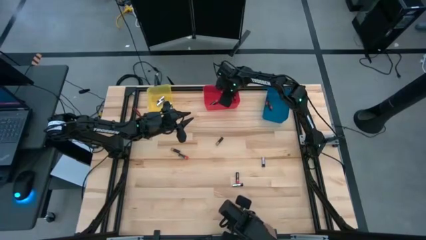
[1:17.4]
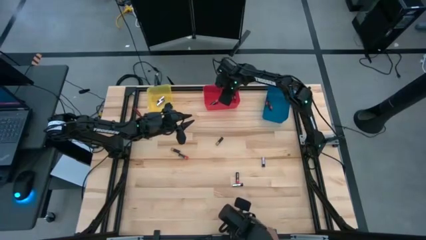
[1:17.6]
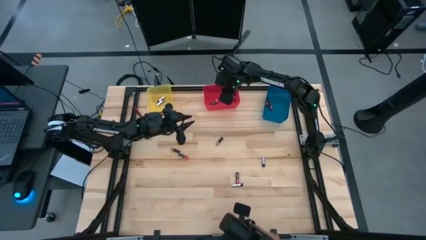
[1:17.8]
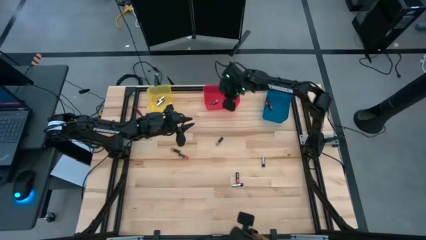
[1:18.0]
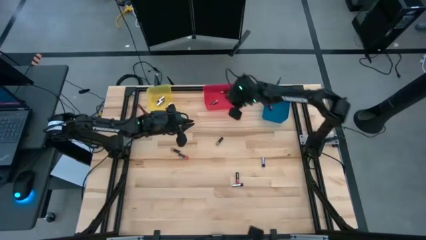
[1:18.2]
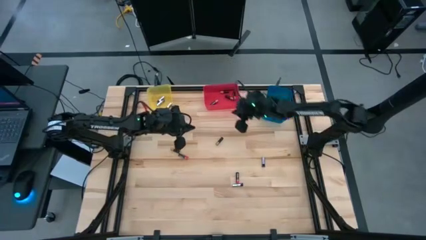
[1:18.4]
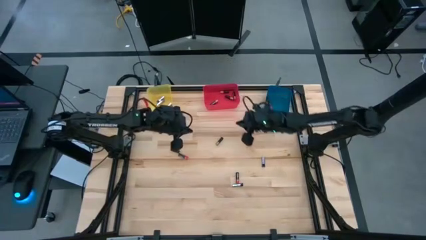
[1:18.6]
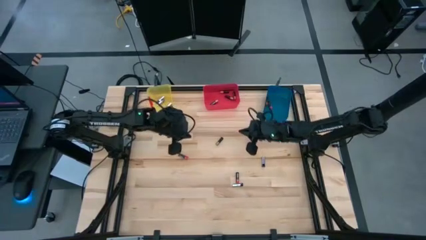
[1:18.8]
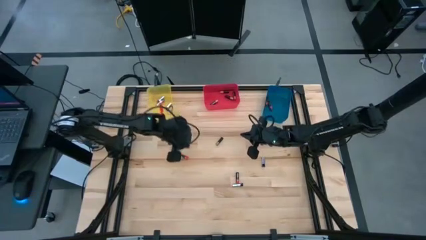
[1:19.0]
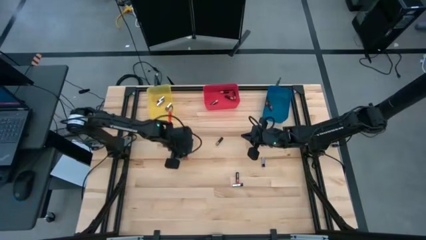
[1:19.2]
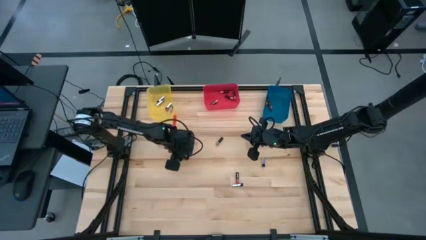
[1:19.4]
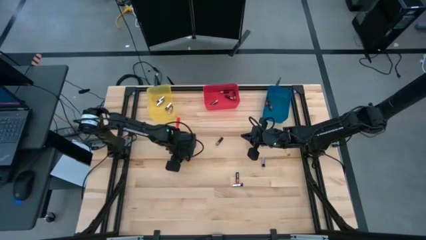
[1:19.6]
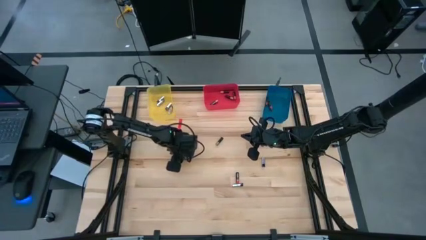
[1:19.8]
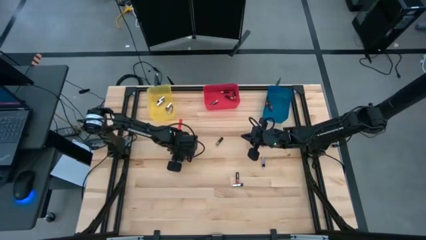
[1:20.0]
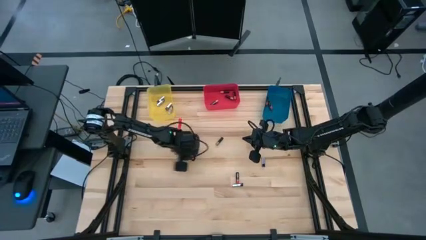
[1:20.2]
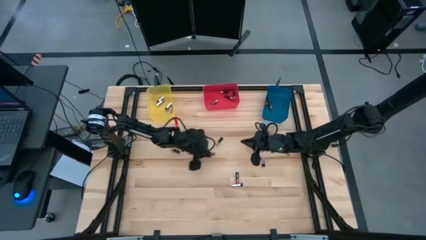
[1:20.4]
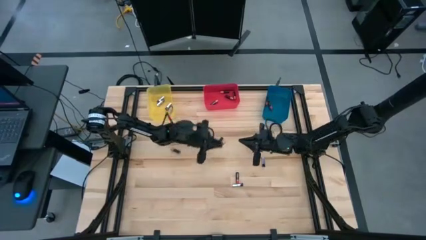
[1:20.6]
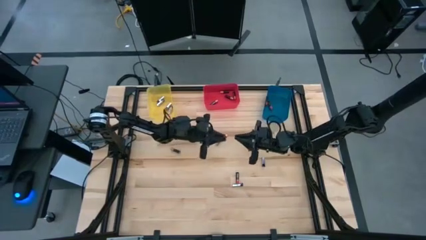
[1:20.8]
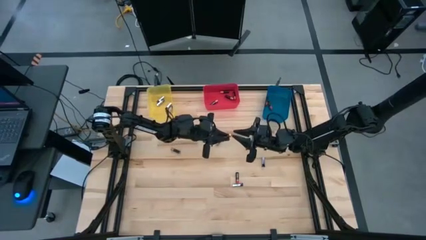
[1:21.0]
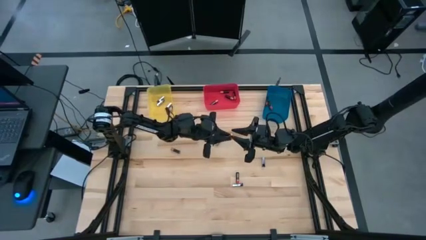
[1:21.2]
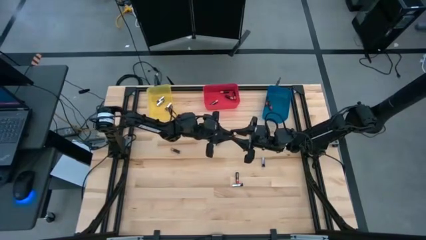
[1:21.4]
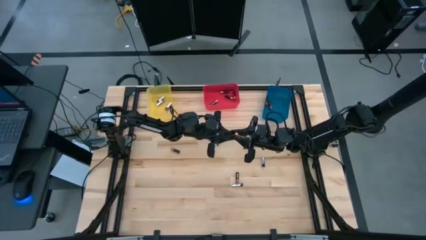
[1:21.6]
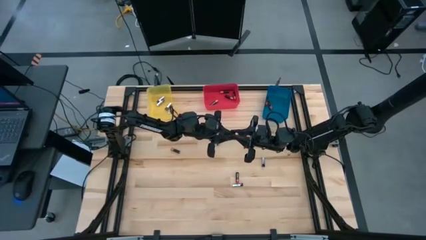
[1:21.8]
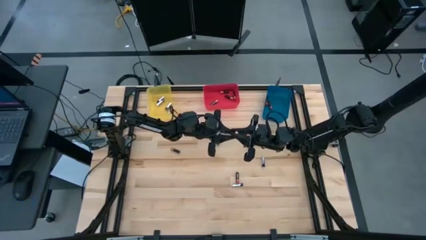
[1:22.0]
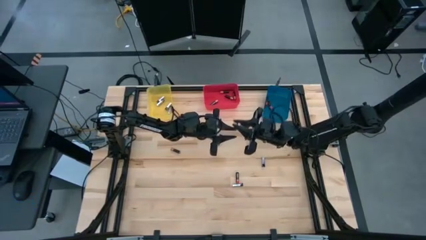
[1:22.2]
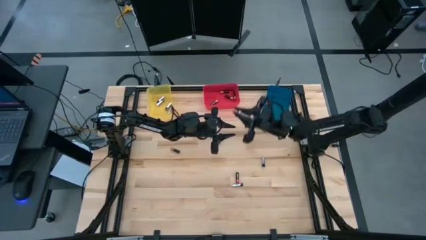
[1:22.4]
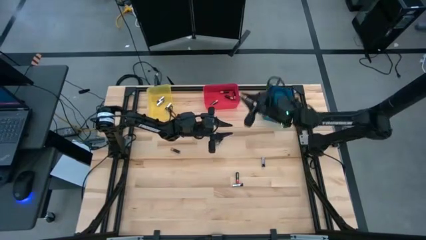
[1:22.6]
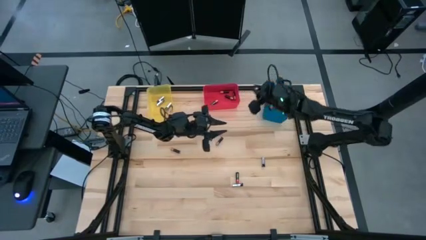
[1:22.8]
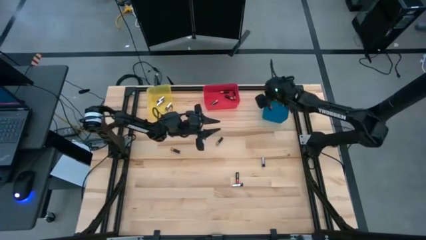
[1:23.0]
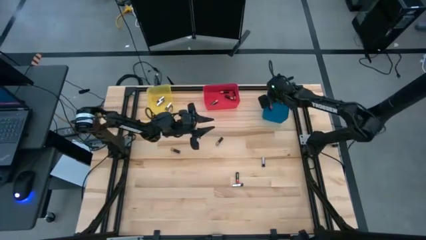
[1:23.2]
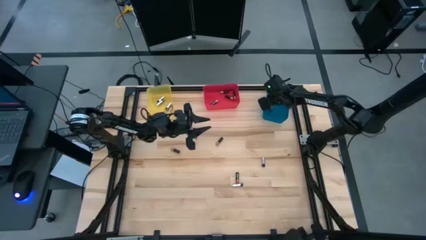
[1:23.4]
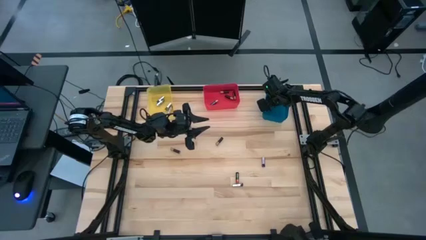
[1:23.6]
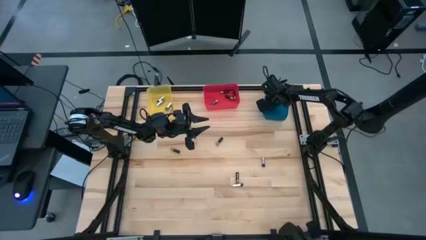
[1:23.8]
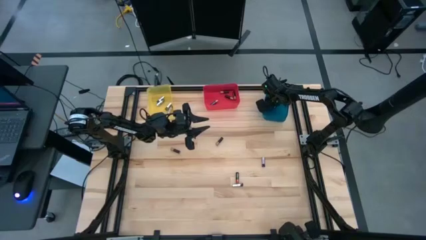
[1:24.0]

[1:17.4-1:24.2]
Task: Sort batteries
Put the red battery into the blue bin

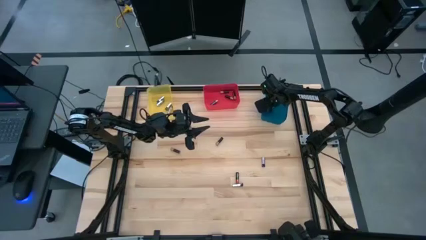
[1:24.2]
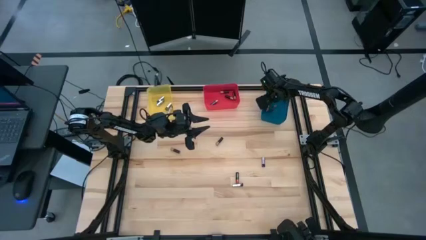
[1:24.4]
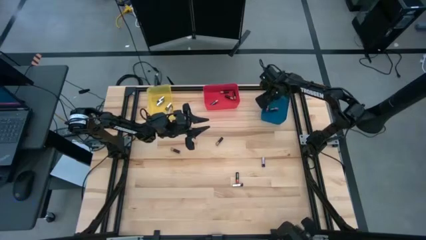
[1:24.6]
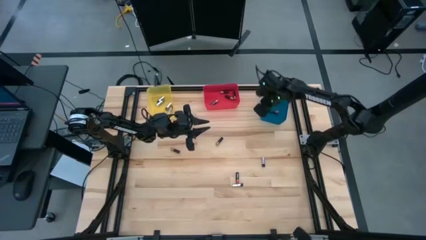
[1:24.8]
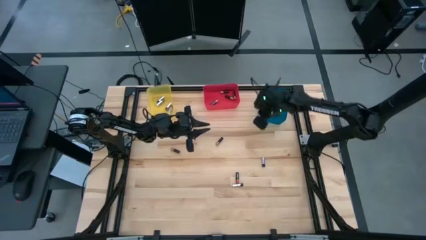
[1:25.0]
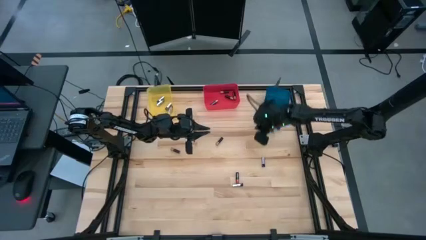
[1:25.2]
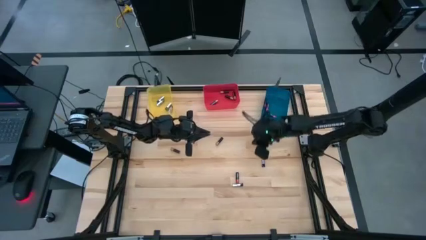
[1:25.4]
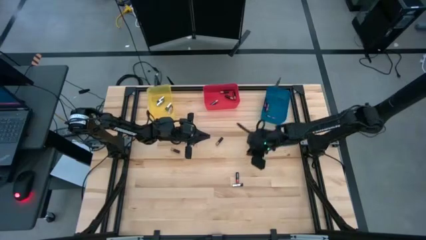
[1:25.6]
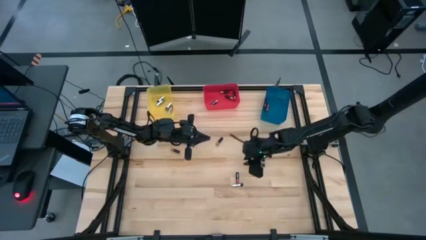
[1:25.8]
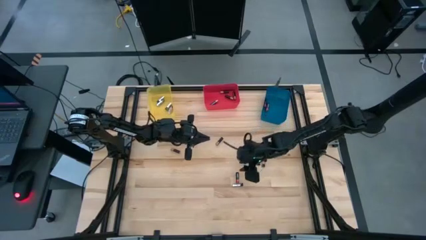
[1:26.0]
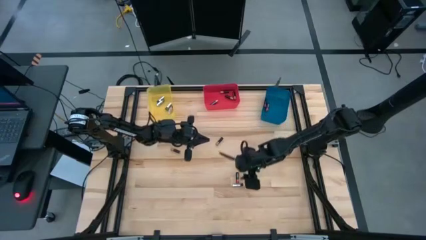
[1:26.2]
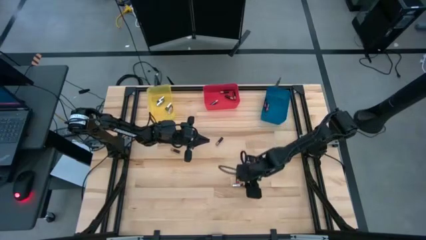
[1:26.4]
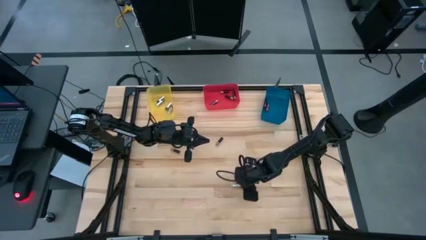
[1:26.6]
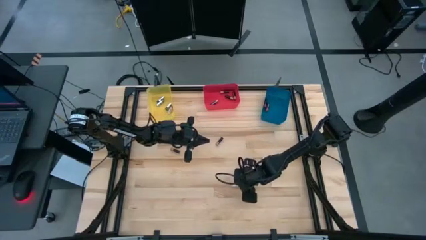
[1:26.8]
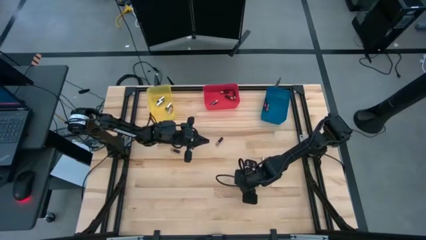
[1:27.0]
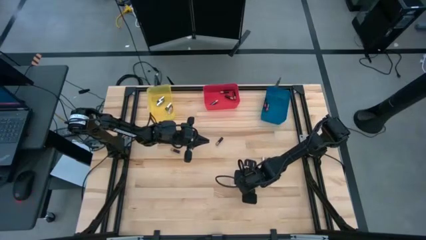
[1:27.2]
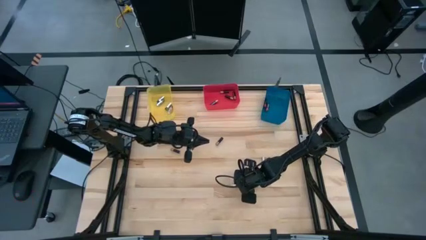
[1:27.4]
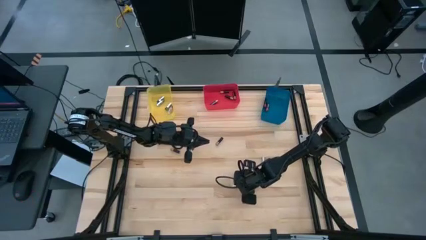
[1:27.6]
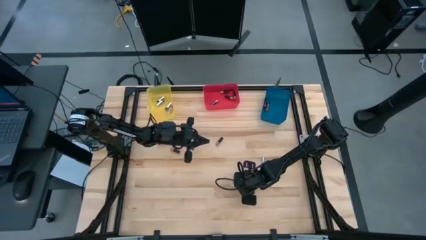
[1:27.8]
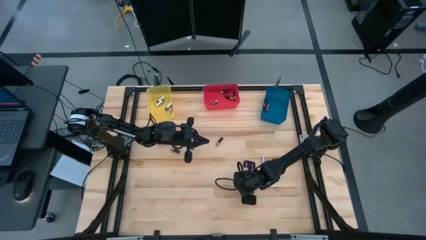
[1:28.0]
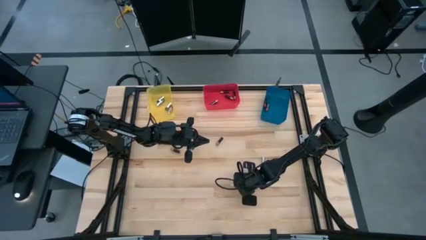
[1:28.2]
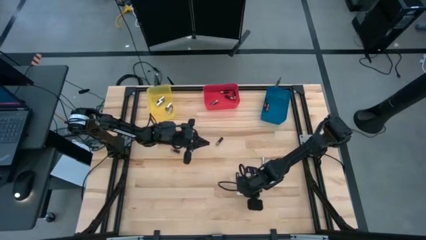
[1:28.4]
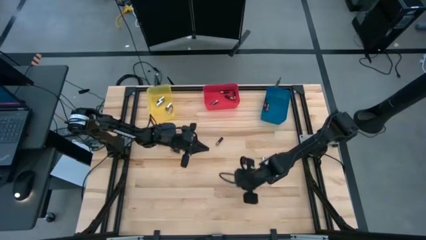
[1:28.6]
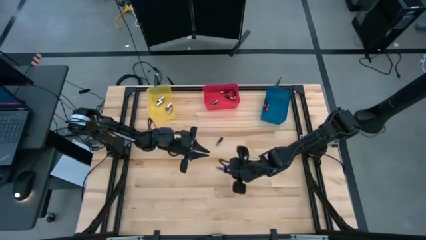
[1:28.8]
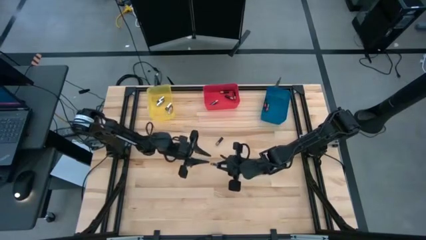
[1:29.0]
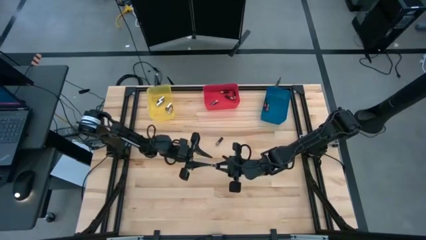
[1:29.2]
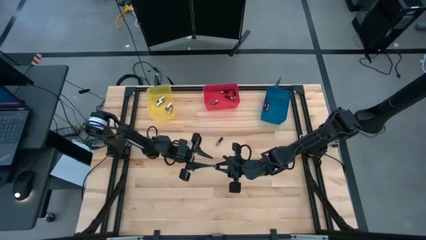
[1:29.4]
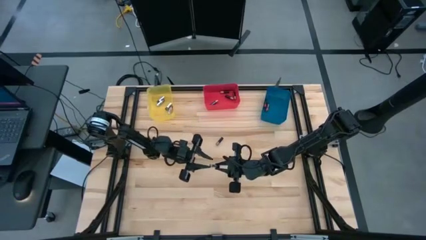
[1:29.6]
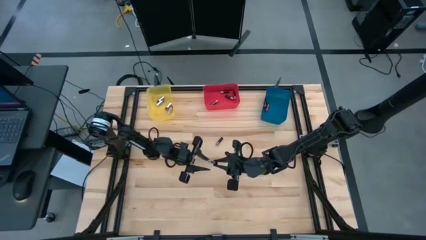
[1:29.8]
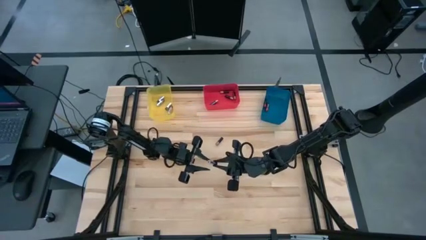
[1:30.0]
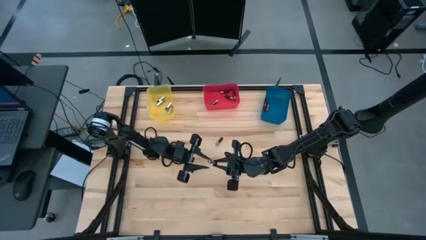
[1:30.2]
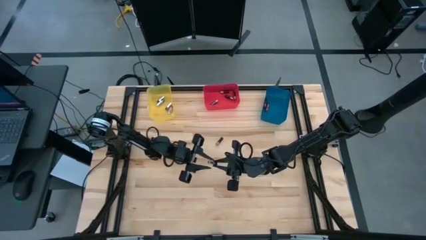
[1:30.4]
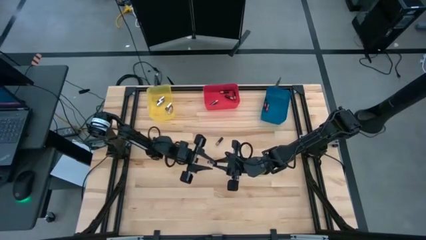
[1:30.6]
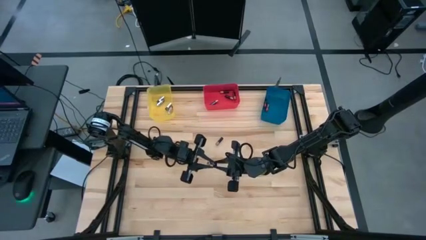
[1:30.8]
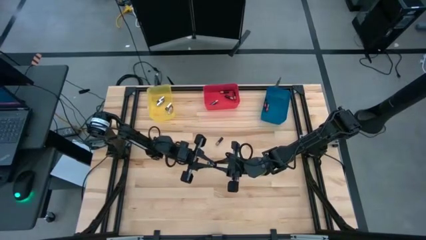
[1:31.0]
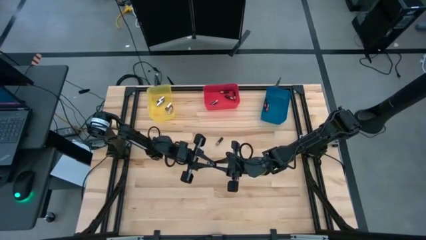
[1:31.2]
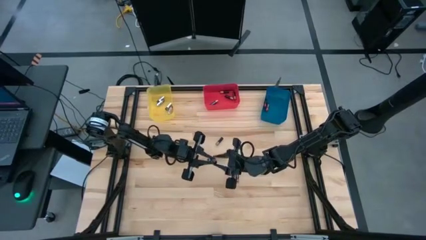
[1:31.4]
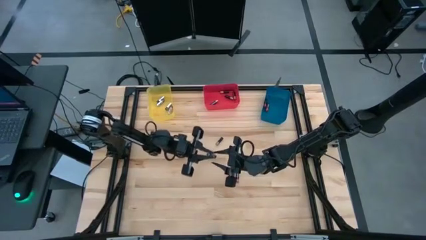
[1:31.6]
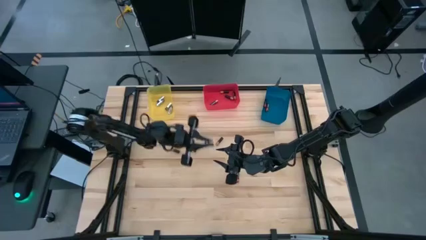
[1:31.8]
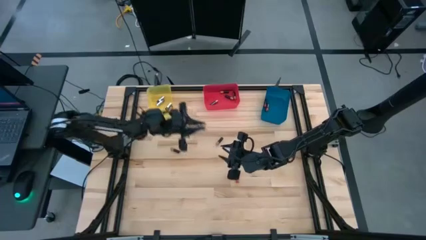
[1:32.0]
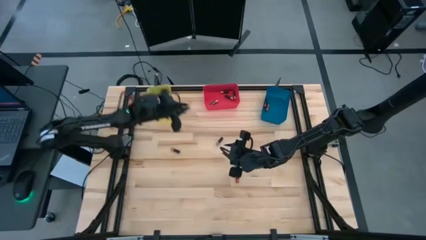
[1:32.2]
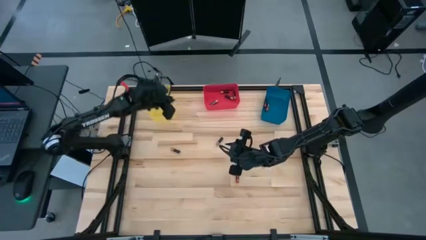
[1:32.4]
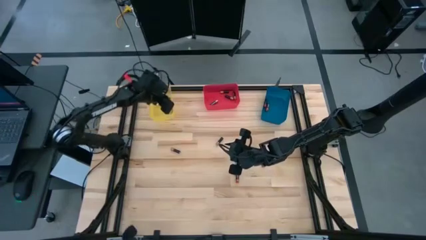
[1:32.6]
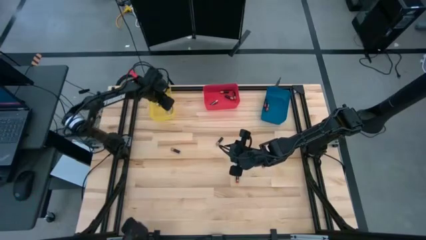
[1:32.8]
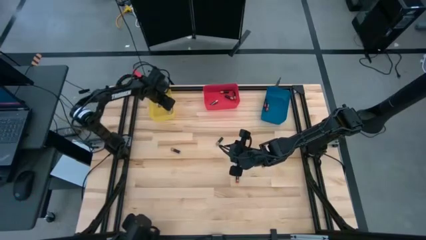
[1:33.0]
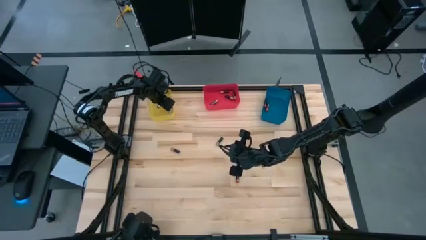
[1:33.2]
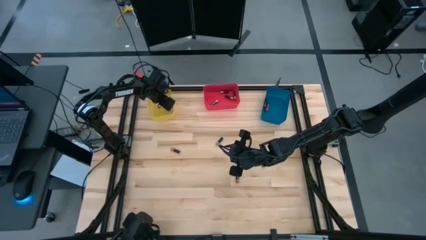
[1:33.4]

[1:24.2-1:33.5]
Put the silver battery into the yellow bin
